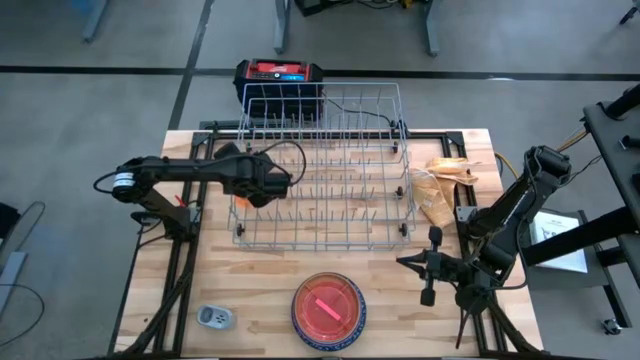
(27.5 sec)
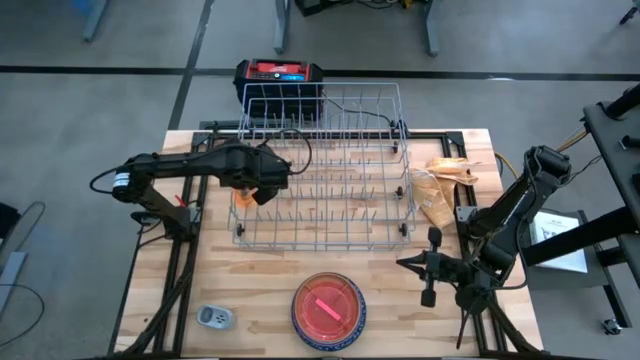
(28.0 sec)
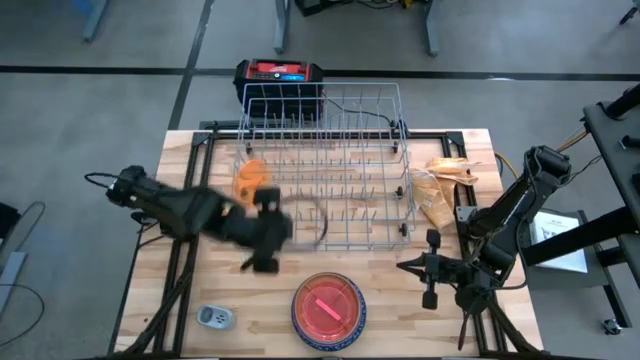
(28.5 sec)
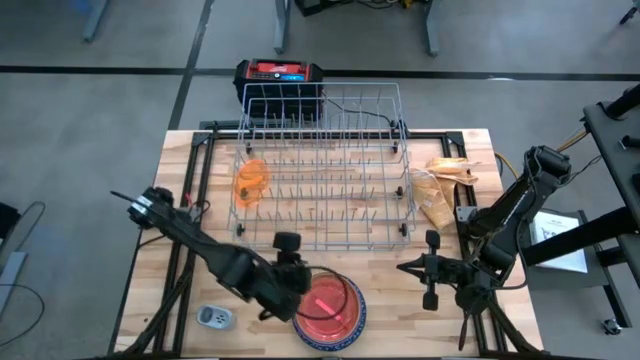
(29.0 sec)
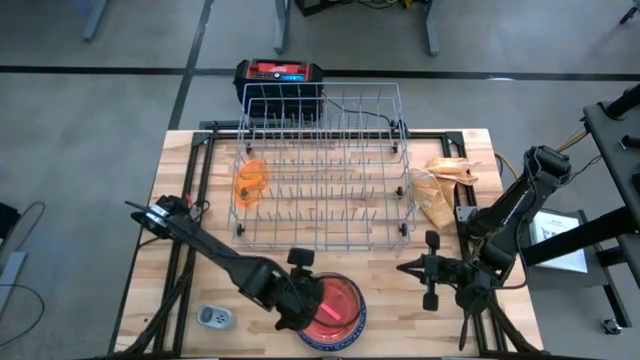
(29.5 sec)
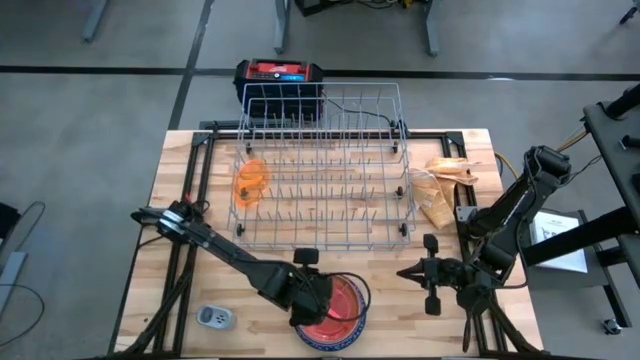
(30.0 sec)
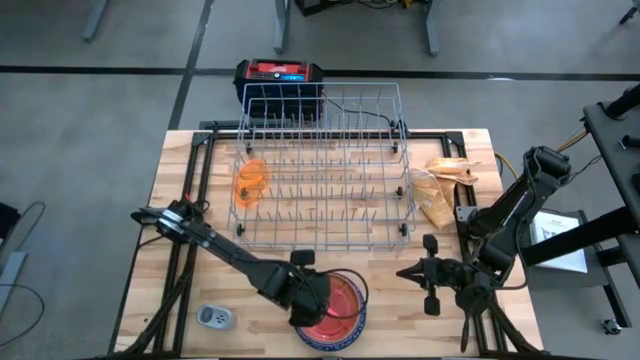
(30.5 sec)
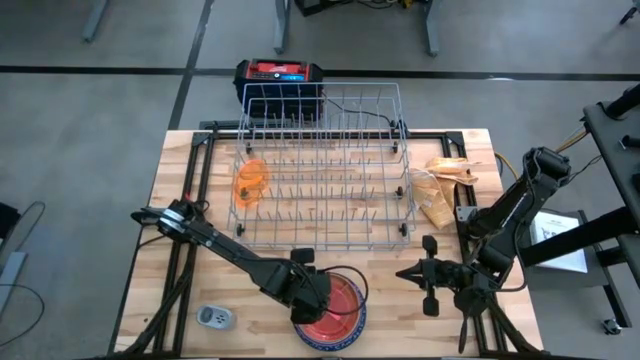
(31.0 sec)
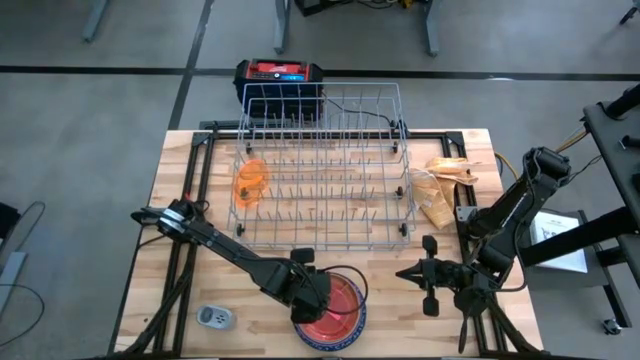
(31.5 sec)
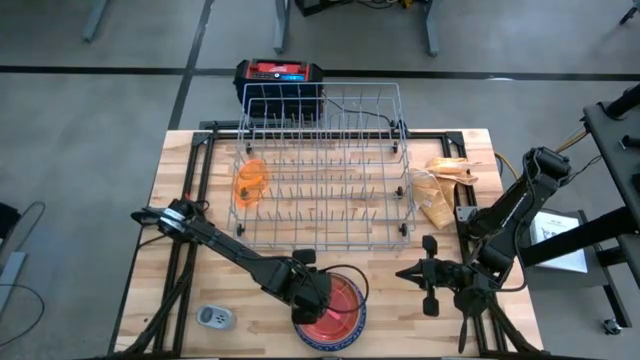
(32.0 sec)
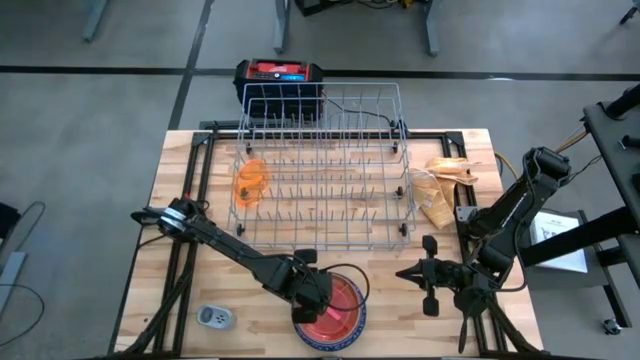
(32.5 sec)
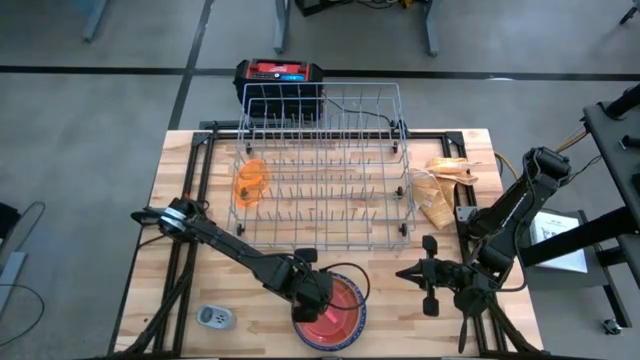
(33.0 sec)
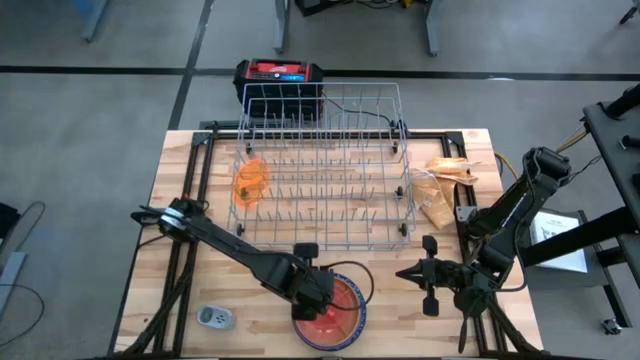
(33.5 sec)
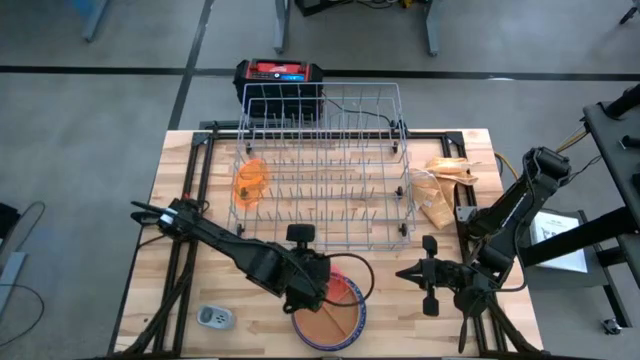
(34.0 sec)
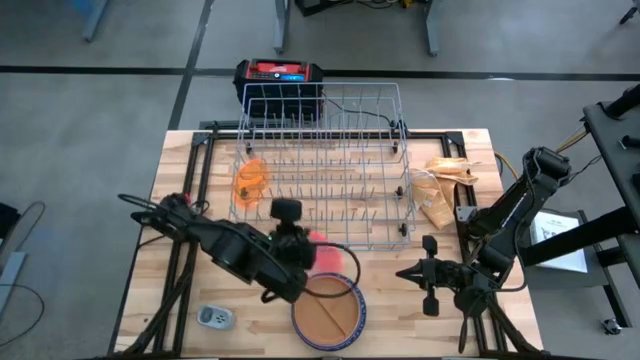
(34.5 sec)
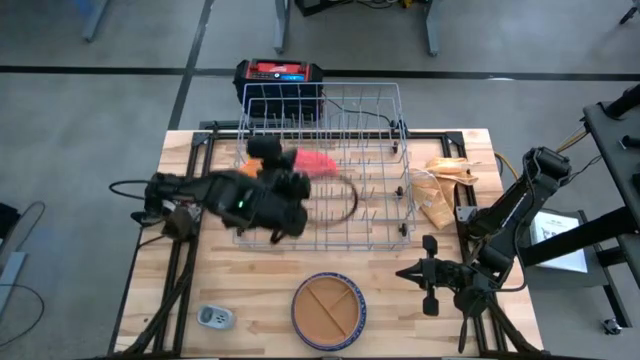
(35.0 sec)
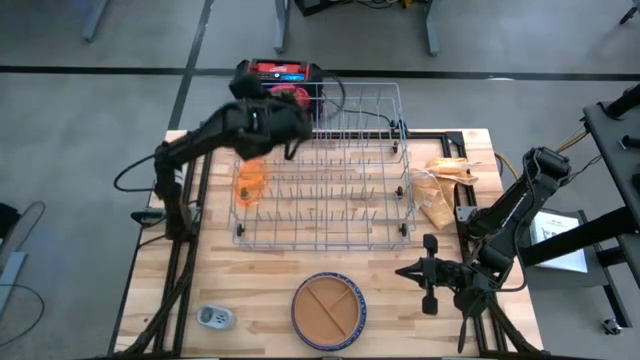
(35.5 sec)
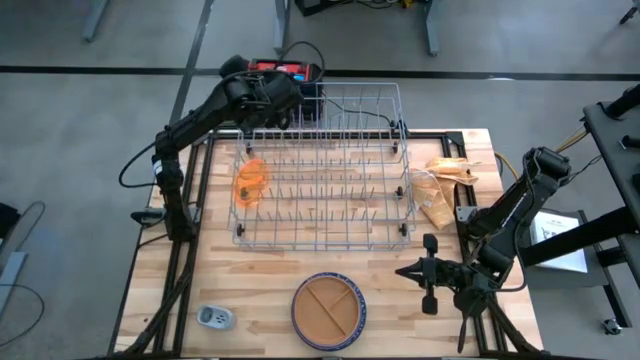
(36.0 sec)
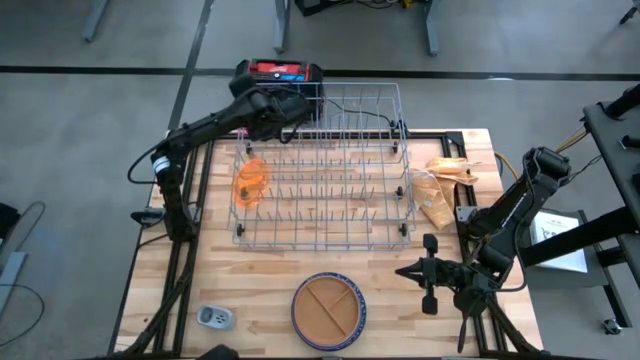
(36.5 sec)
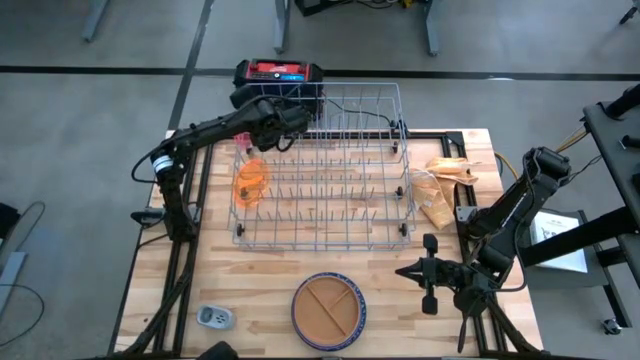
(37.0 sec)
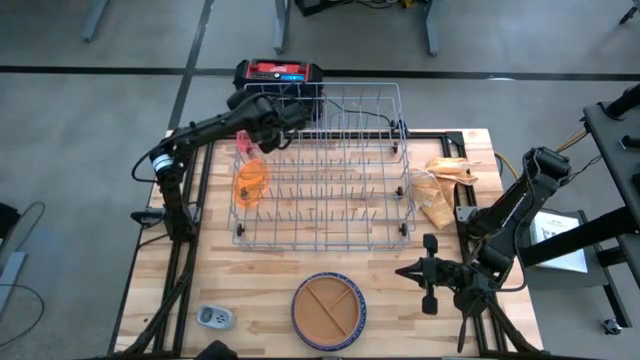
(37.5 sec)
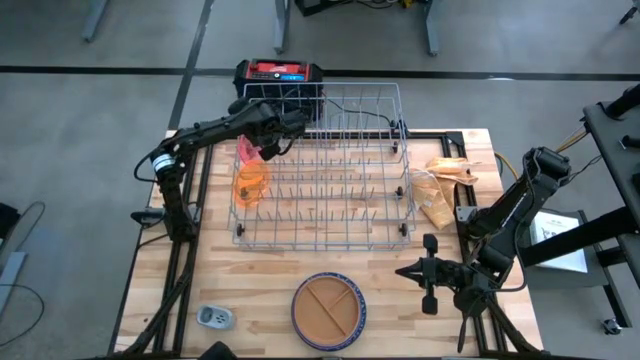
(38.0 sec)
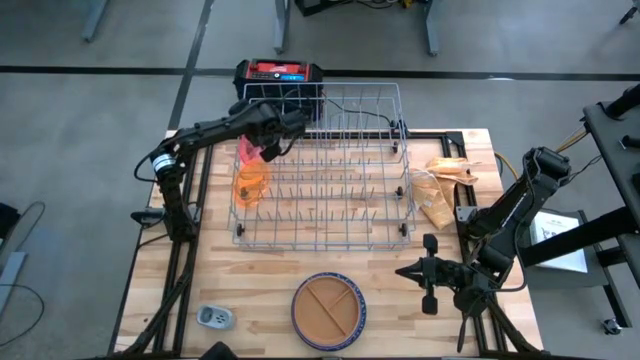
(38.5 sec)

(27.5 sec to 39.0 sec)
Task: Sort dishes
Put the pink plate into the dish rack

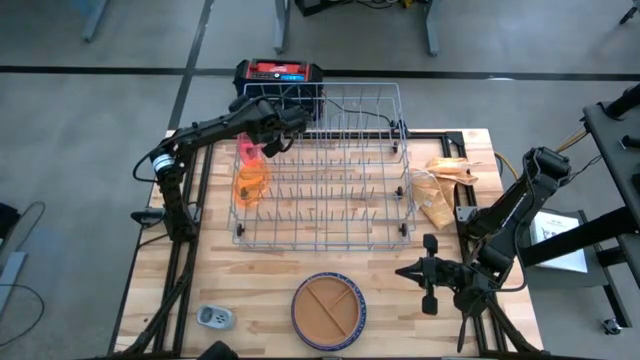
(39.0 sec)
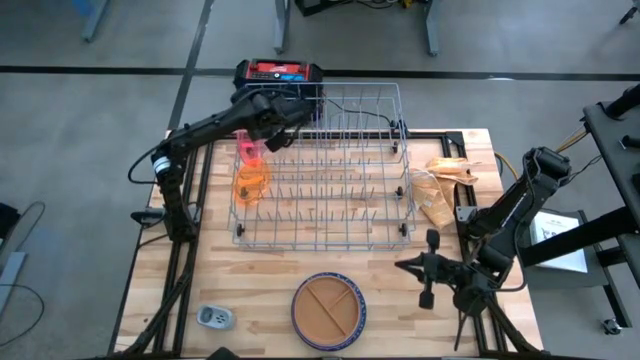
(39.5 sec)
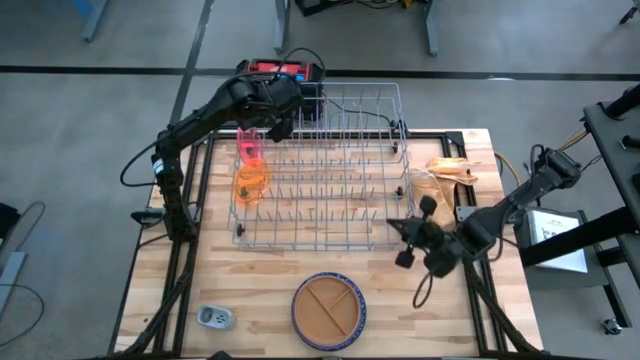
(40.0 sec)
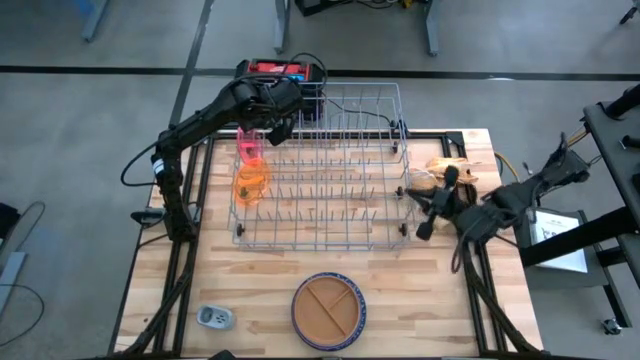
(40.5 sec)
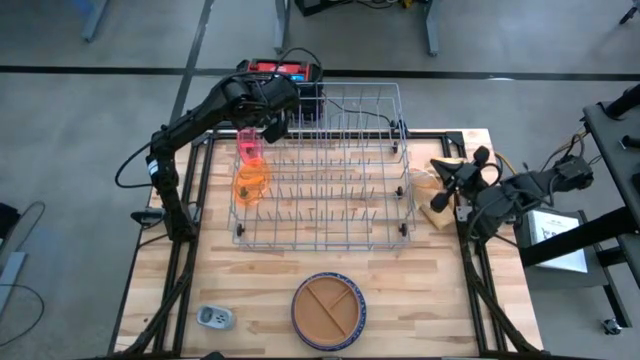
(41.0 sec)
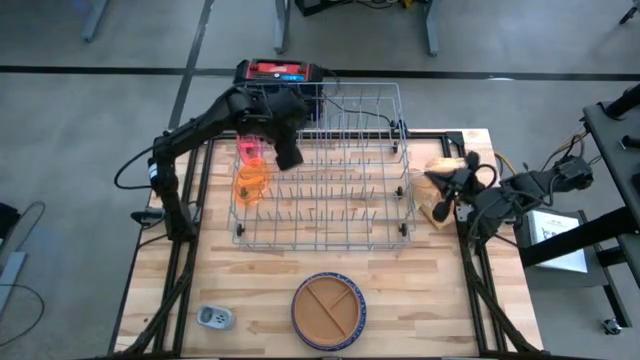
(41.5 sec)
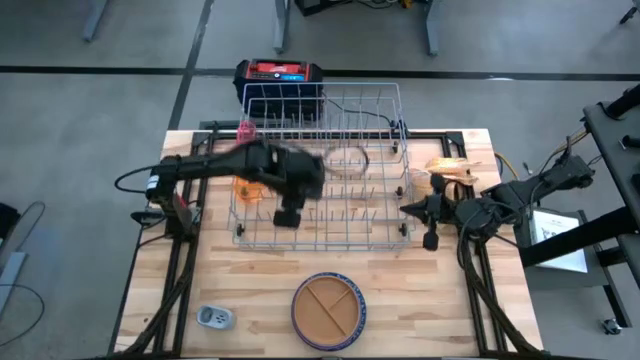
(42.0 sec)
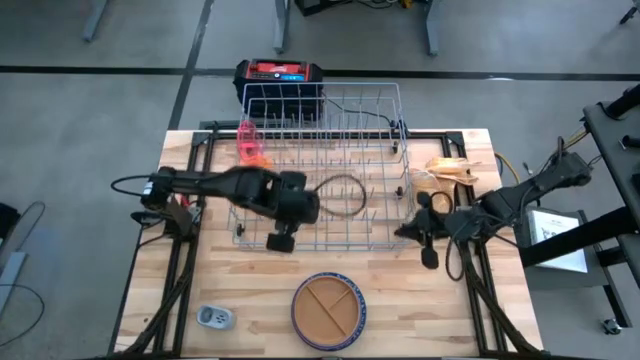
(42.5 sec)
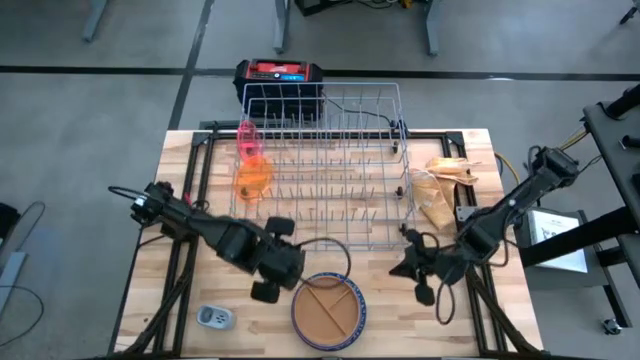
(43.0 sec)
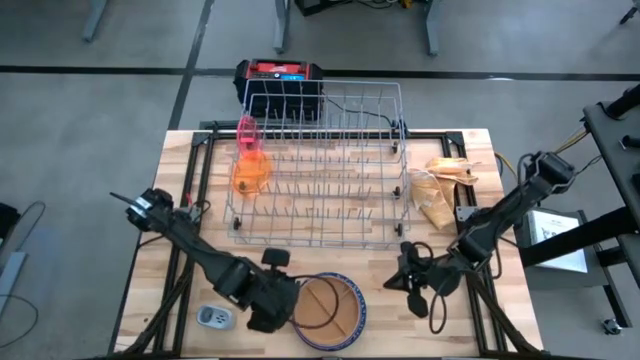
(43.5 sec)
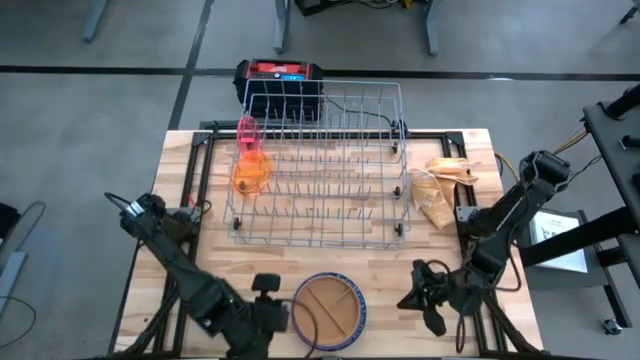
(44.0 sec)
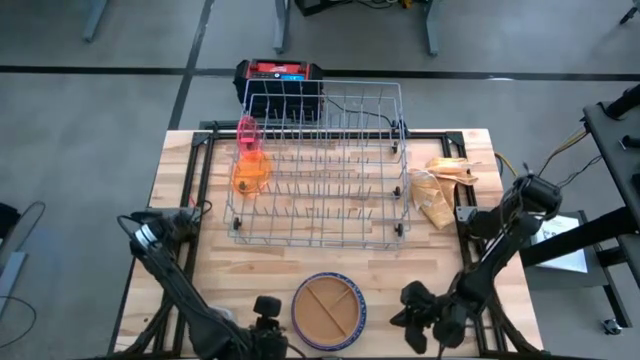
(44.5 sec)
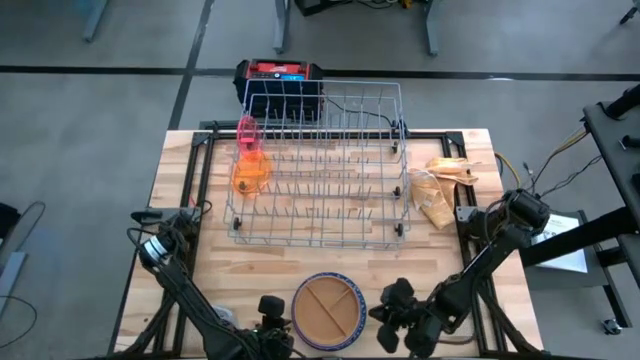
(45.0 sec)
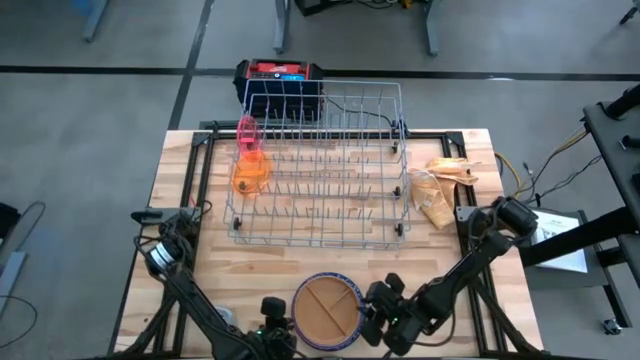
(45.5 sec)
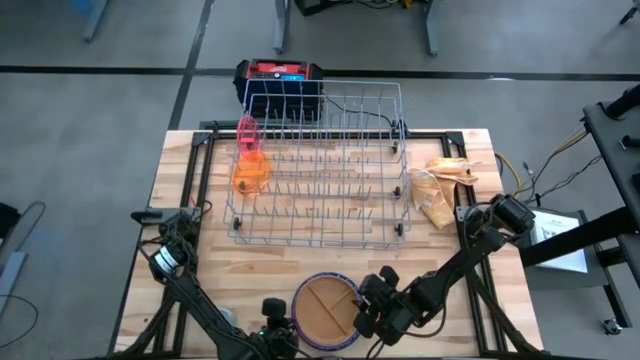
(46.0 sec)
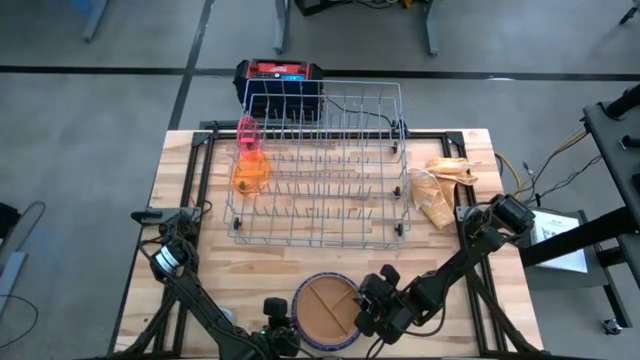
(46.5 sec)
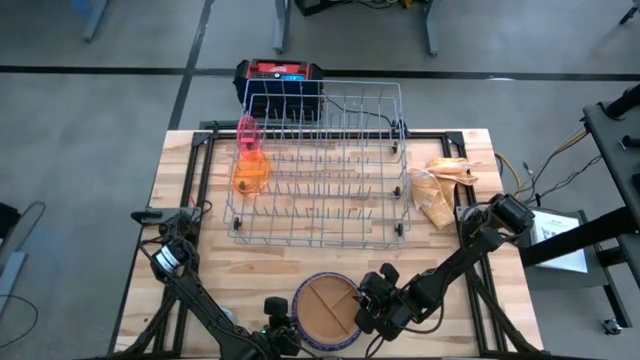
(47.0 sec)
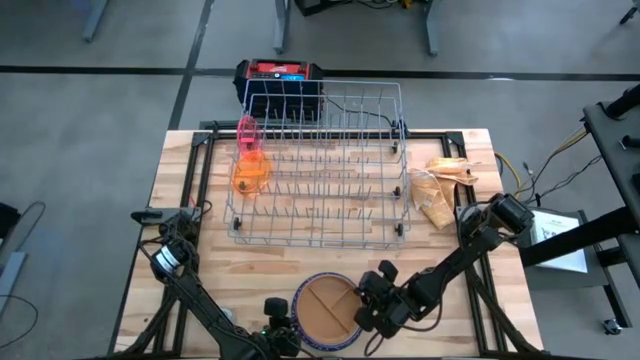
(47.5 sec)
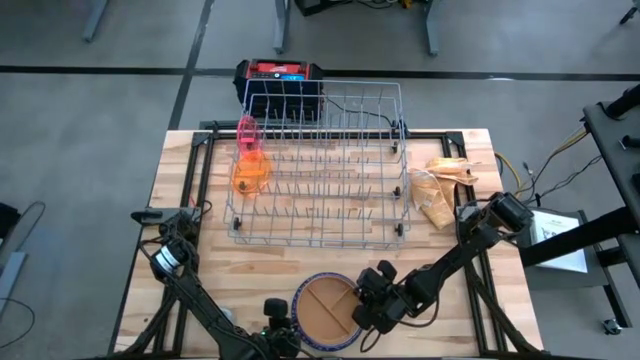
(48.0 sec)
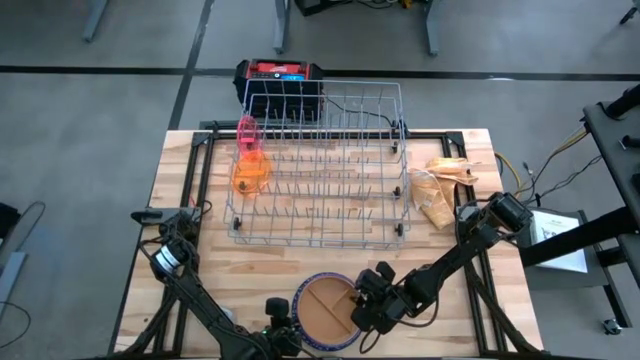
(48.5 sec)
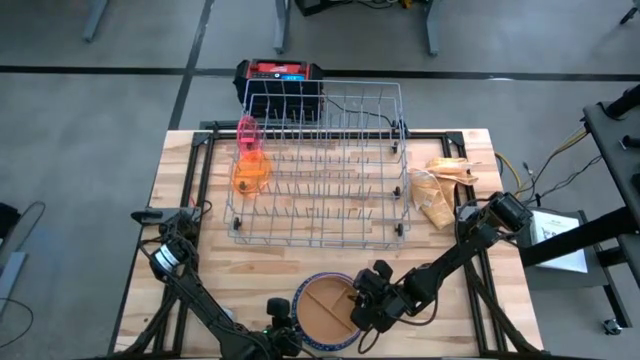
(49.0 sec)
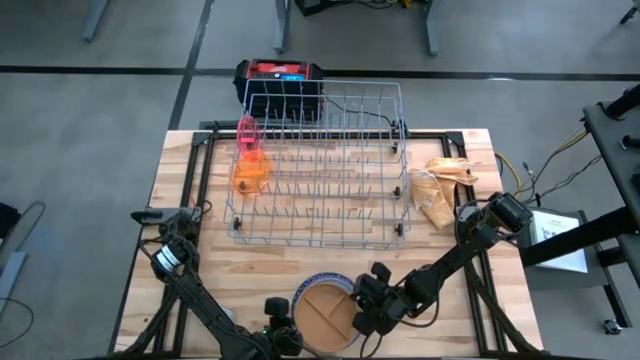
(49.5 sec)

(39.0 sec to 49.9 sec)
Put the brown plate into the dish rack
